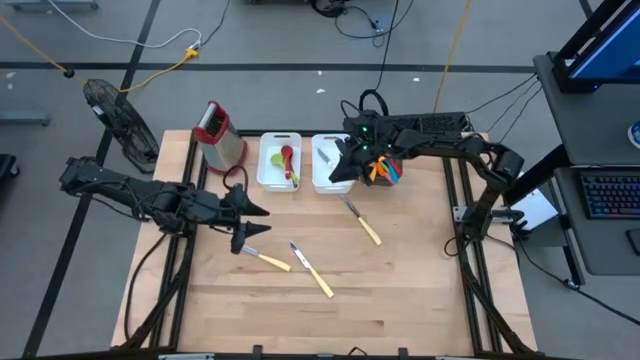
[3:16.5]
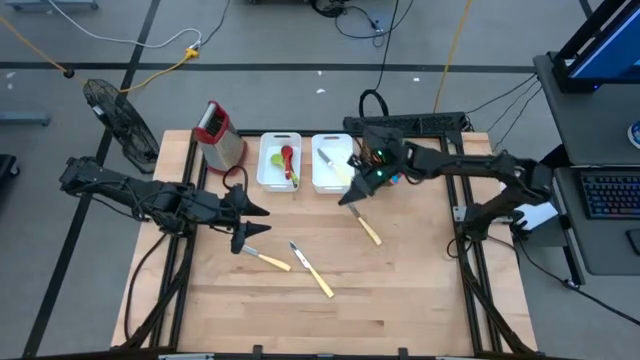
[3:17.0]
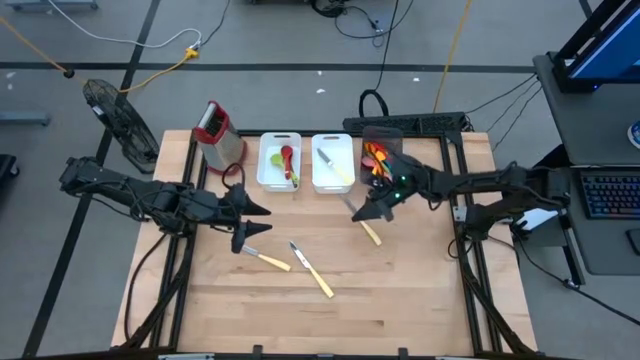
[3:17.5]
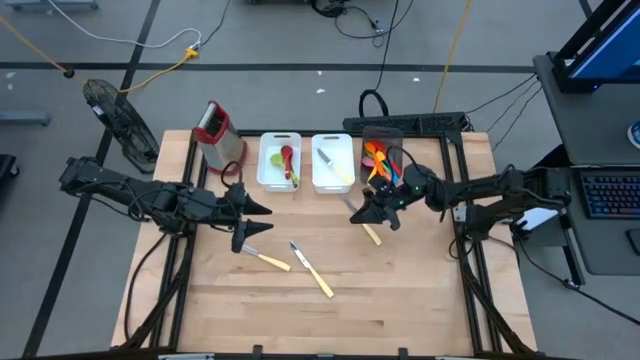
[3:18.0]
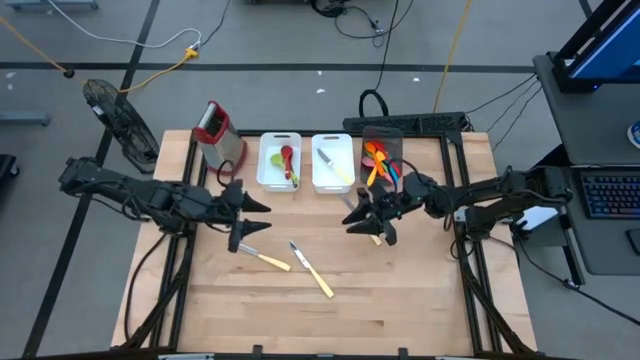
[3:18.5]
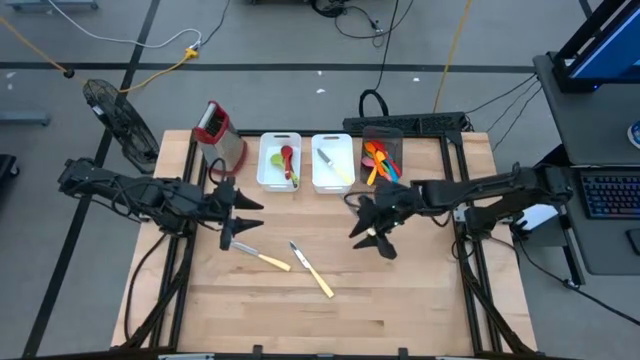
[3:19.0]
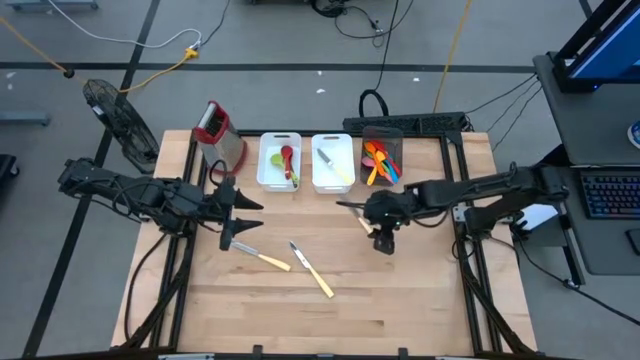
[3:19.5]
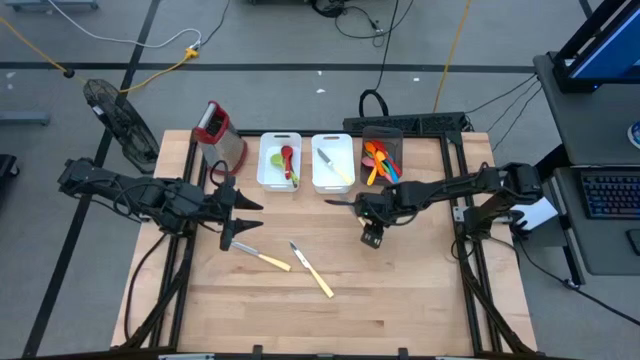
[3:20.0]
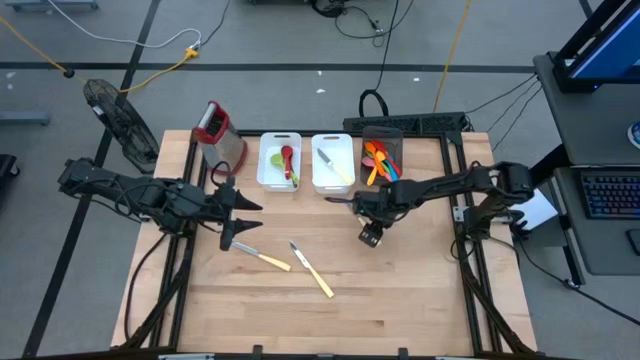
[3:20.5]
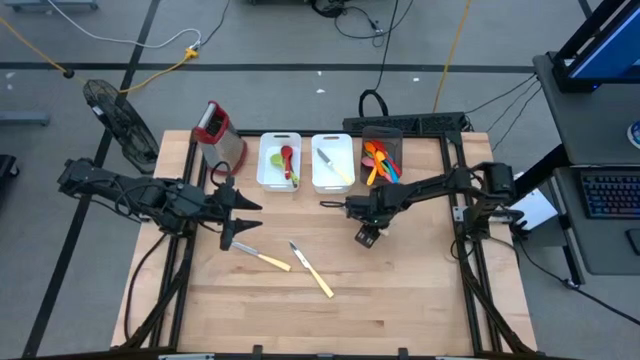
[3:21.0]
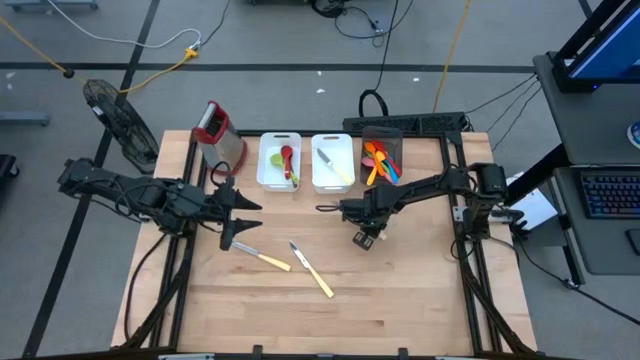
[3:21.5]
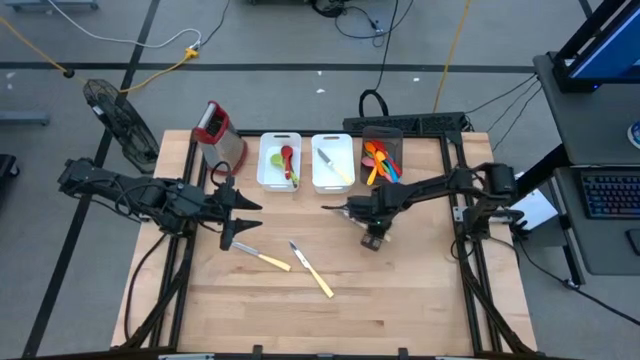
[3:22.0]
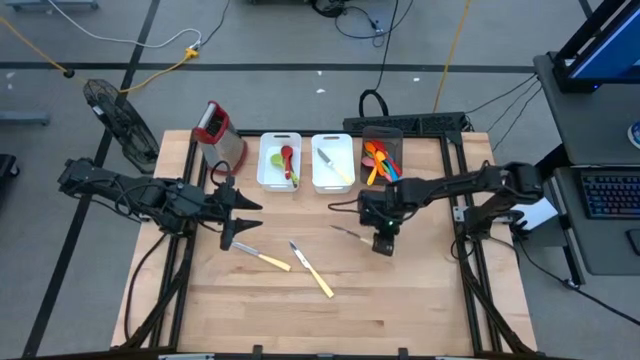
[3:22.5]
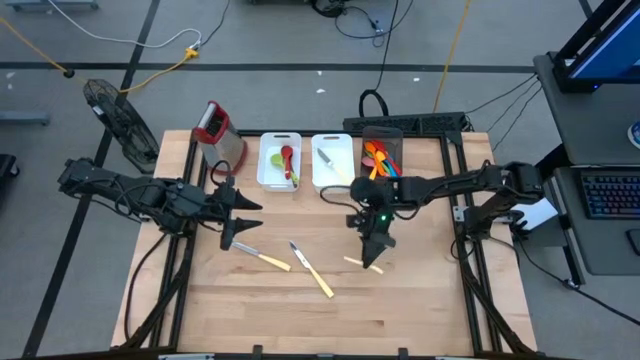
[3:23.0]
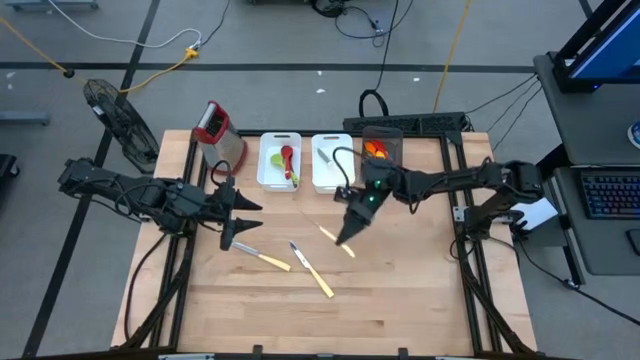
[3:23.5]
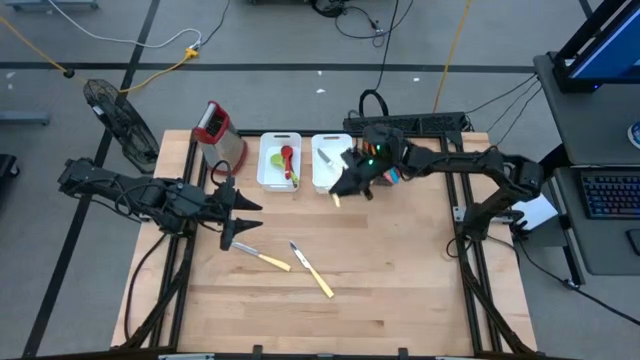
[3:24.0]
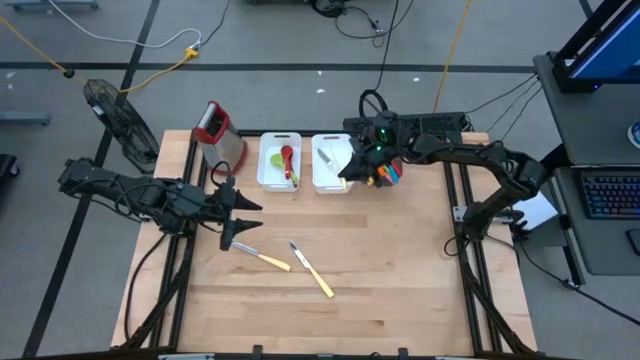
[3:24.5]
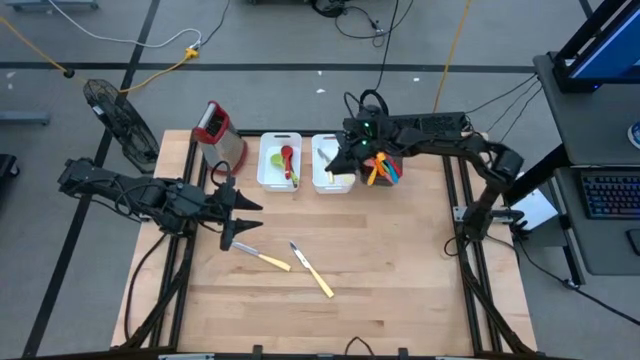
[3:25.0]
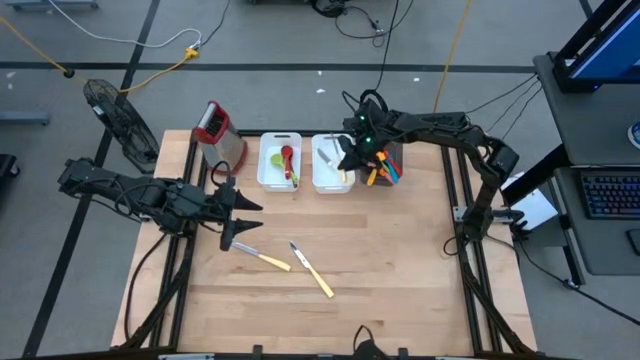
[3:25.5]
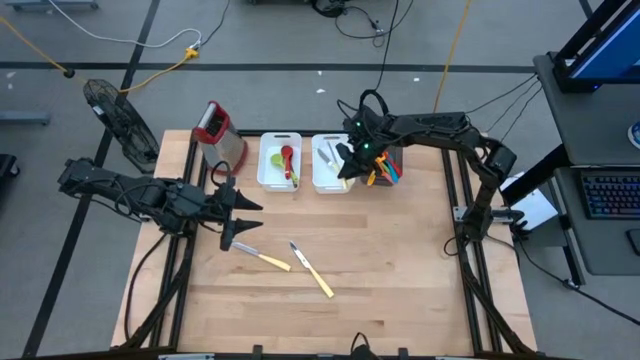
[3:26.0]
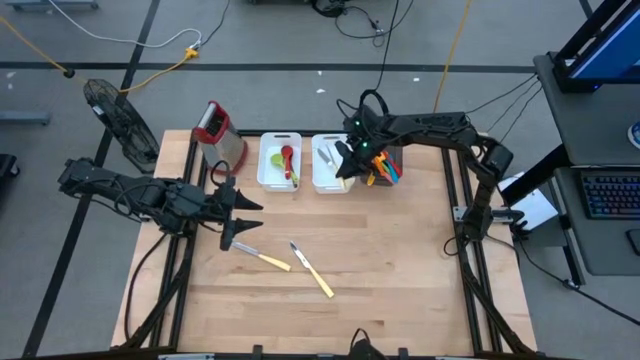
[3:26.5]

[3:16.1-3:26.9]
Task: Pick & Place Kitchen Items
Put the yellow knife into the right white bin

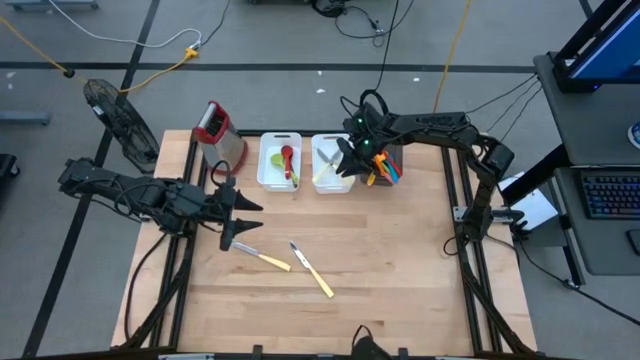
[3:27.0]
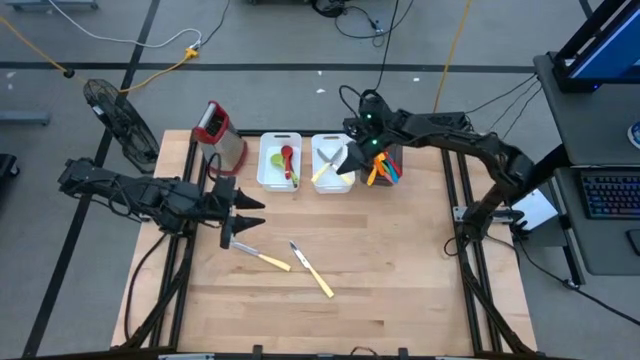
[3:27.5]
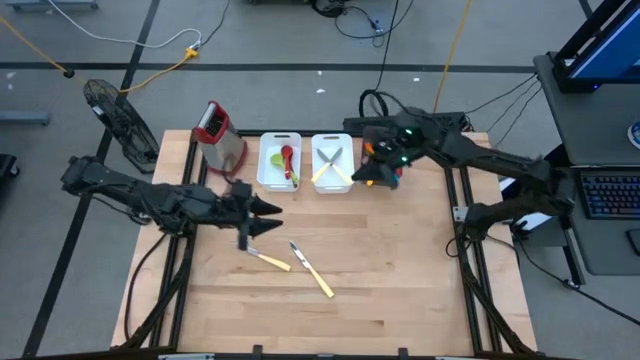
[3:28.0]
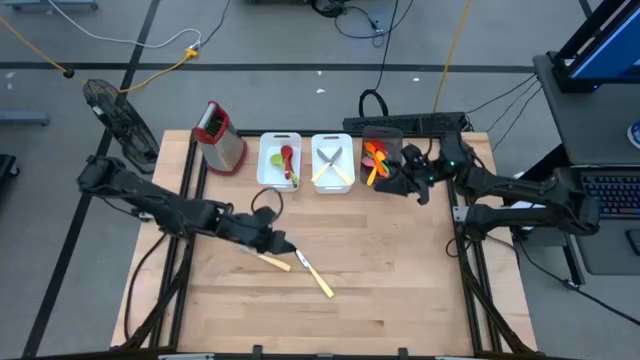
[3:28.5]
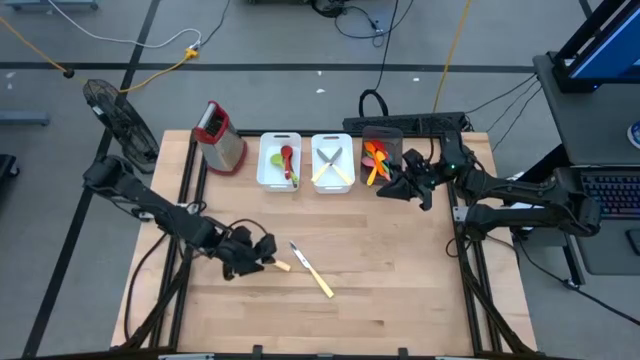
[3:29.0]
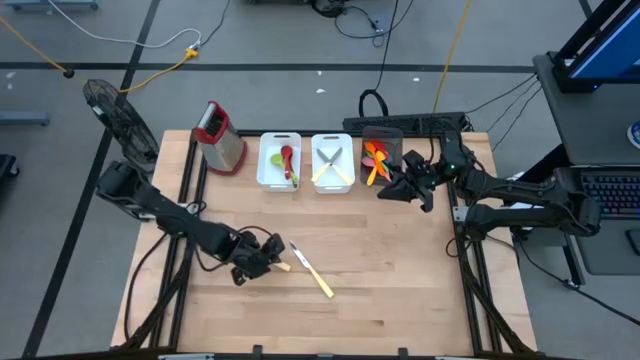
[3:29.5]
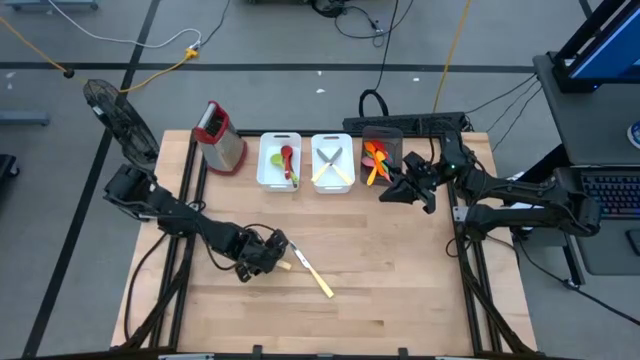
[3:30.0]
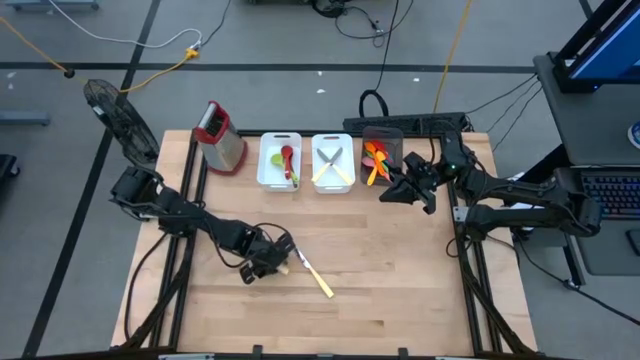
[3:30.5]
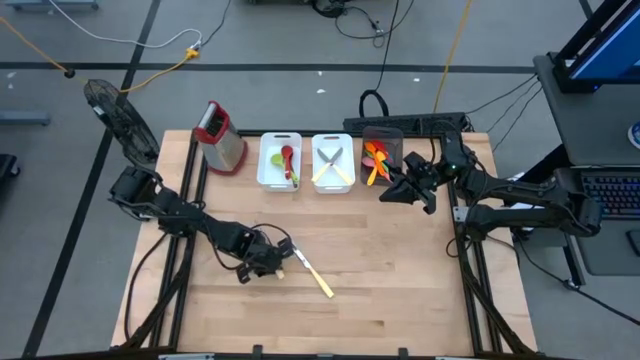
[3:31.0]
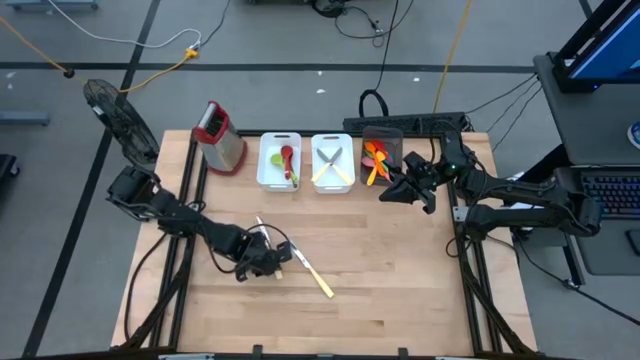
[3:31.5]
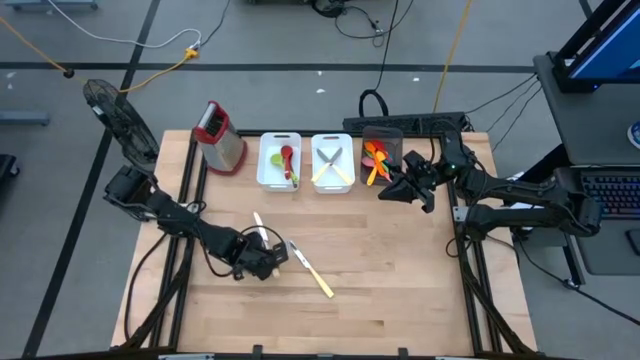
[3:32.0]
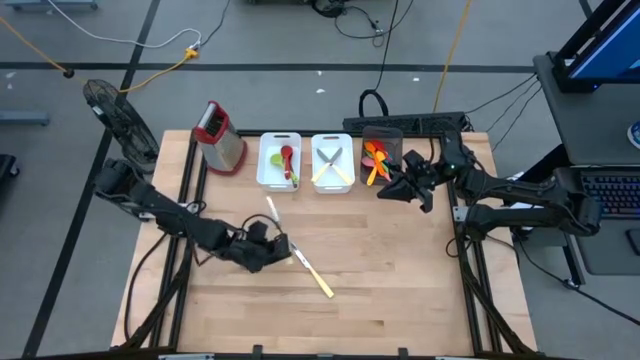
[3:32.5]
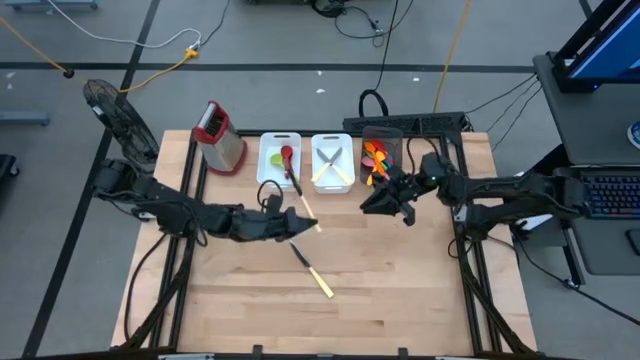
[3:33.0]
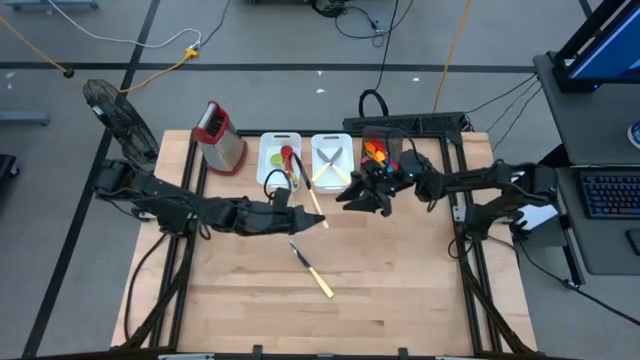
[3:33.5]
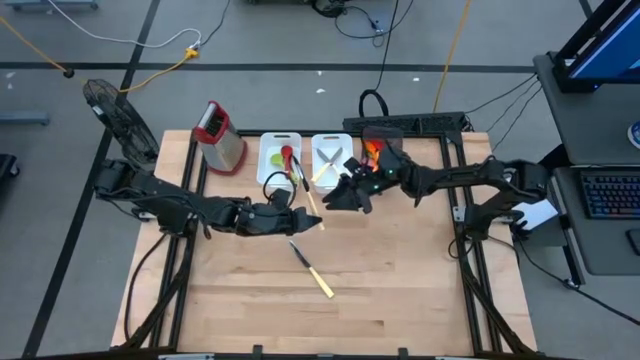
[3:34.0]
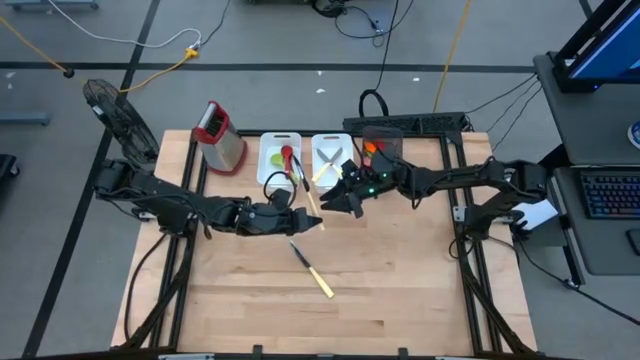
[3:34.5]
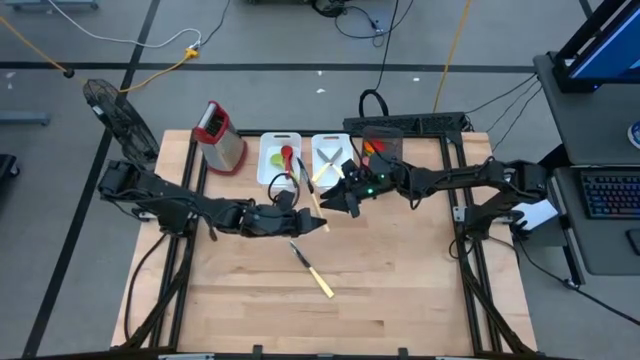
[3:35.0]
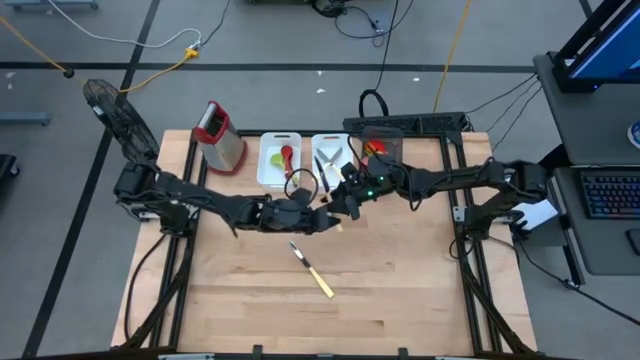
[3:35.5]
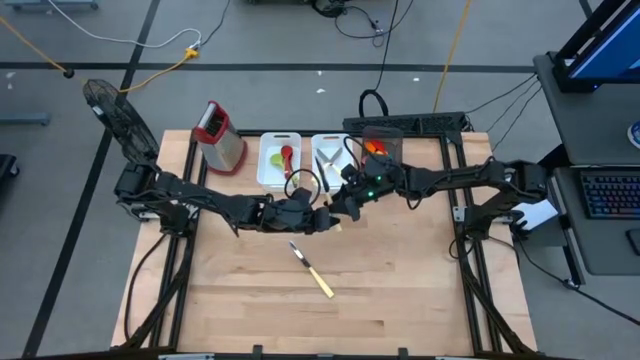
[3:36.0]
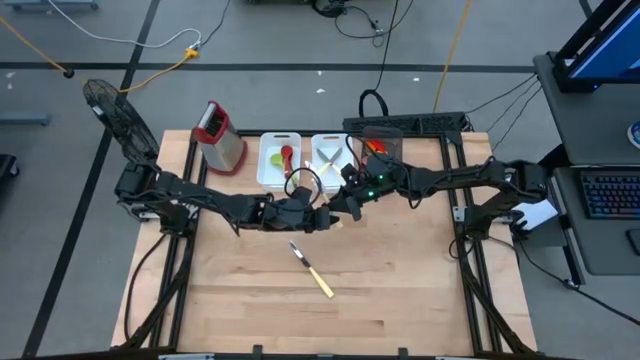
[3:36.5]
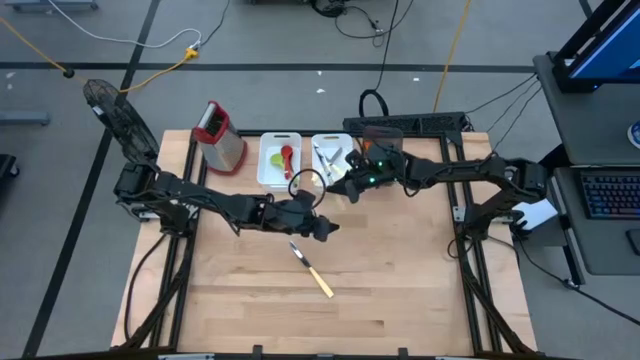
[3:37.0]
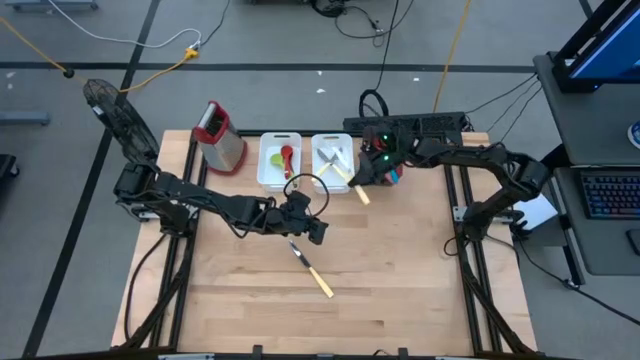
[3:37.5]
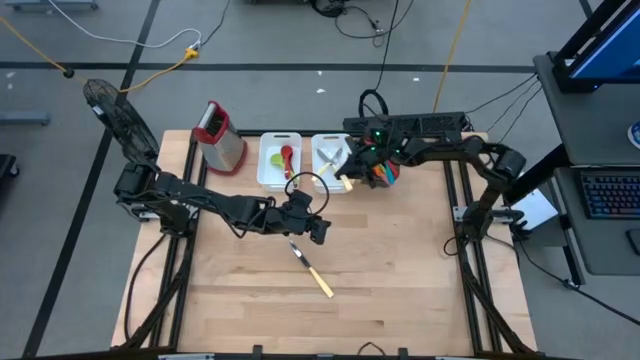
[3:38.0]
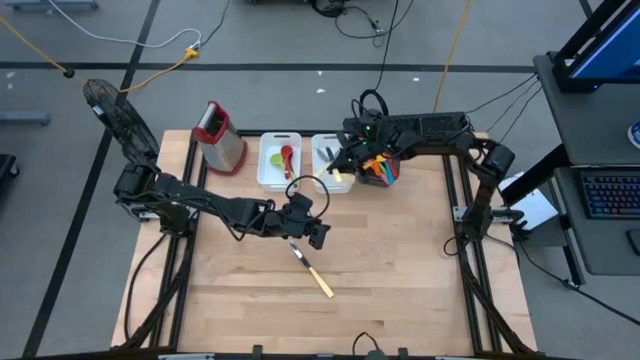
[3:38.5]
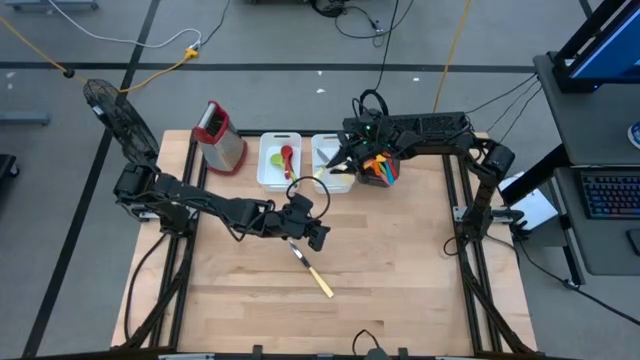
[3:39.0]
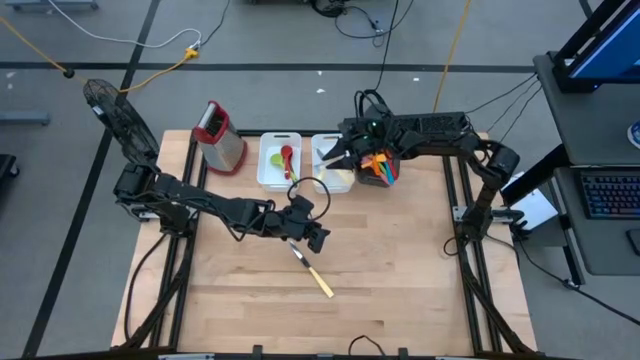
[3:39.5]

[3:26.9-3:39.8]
Put the yellow knife into the right white bin
